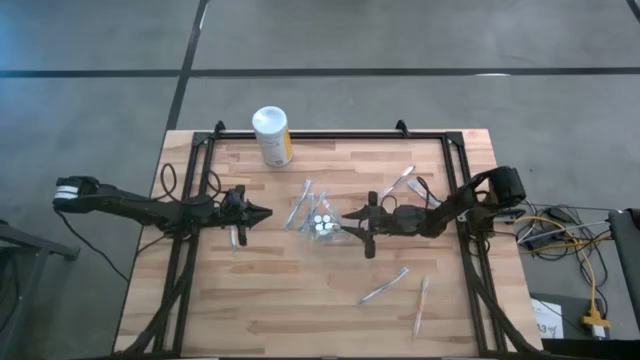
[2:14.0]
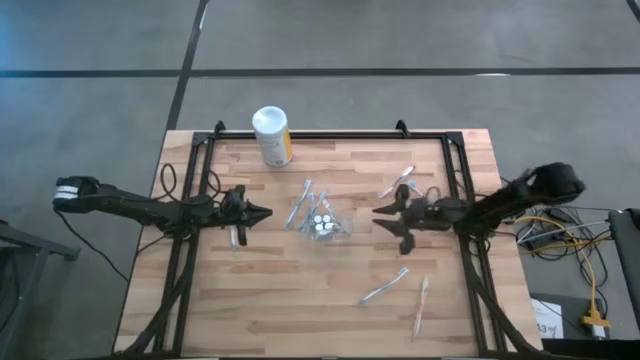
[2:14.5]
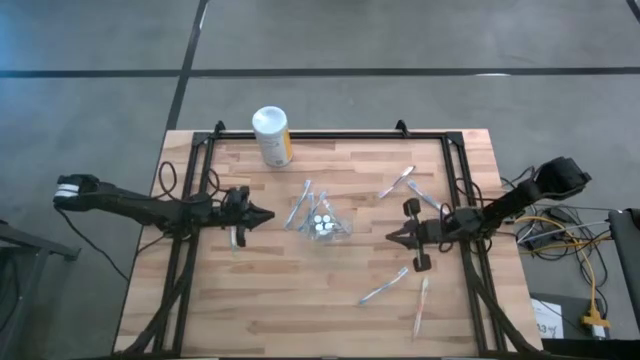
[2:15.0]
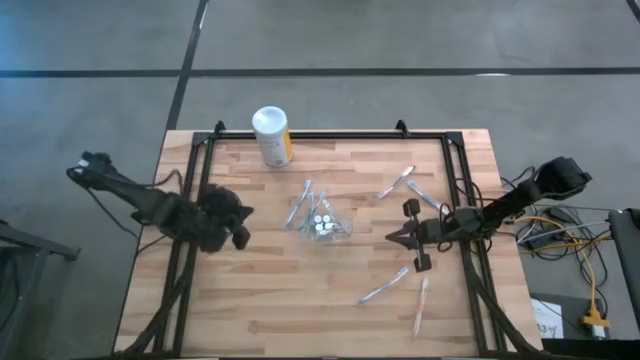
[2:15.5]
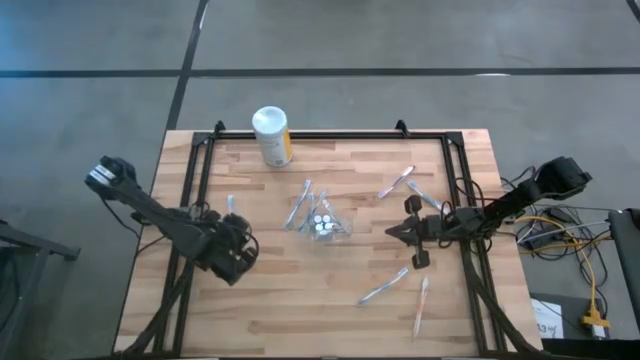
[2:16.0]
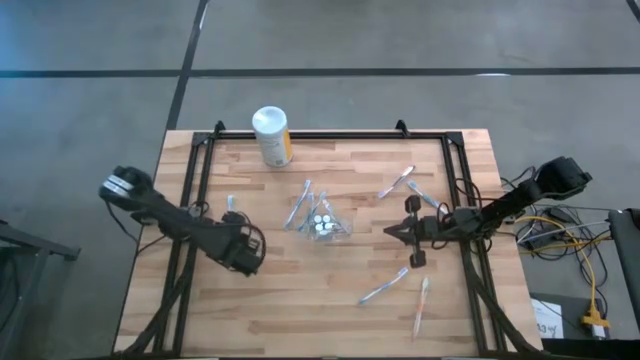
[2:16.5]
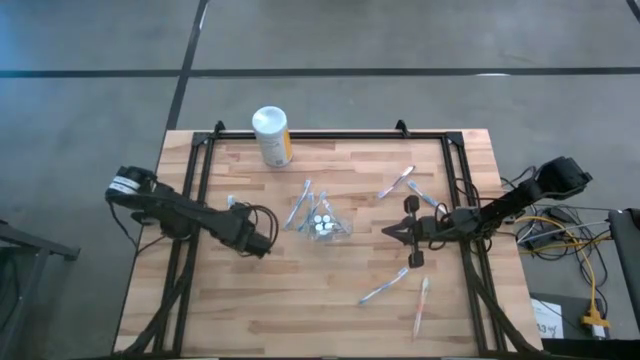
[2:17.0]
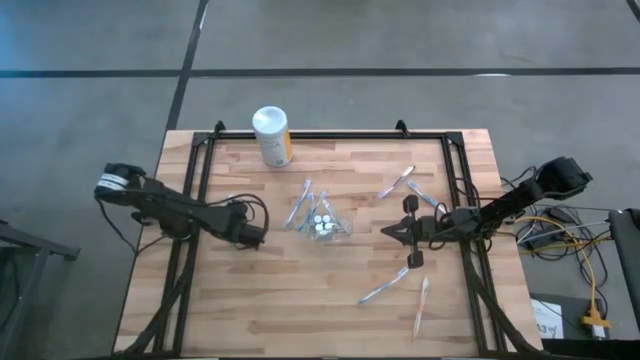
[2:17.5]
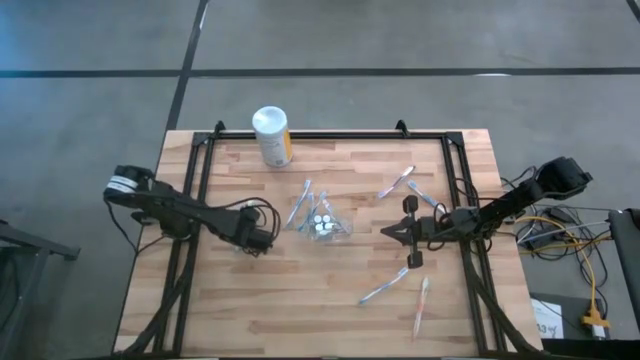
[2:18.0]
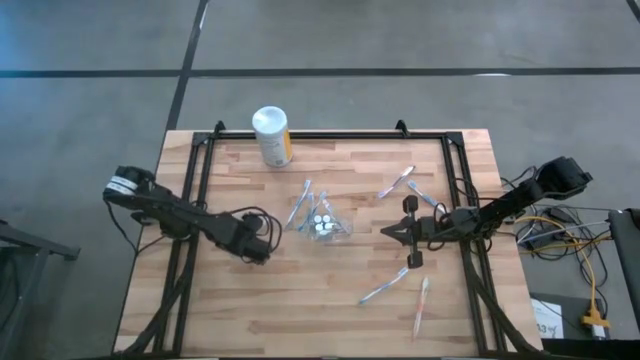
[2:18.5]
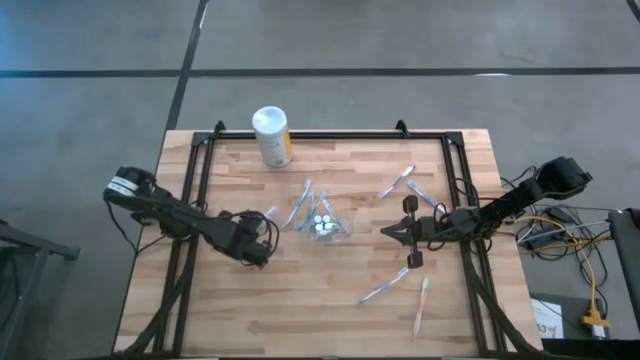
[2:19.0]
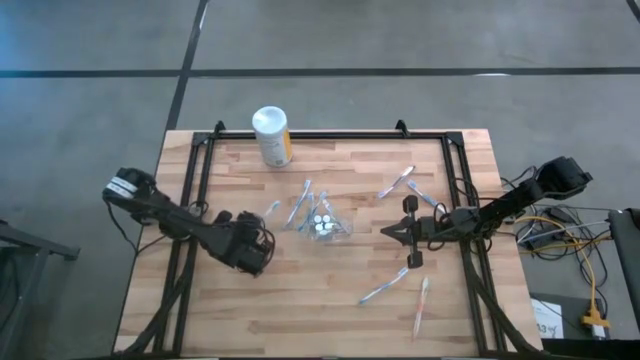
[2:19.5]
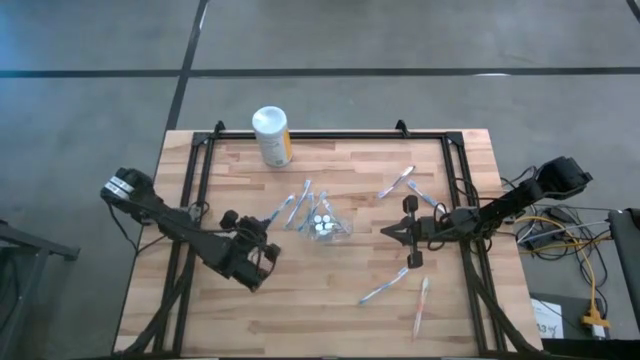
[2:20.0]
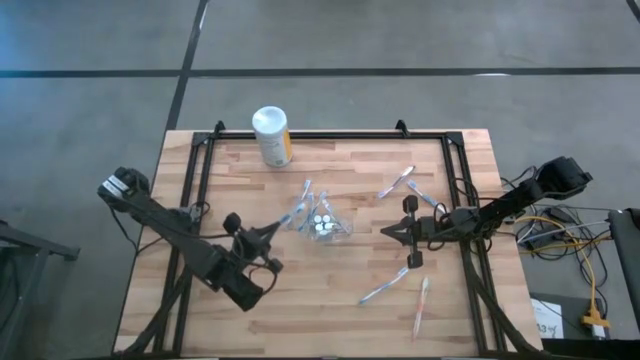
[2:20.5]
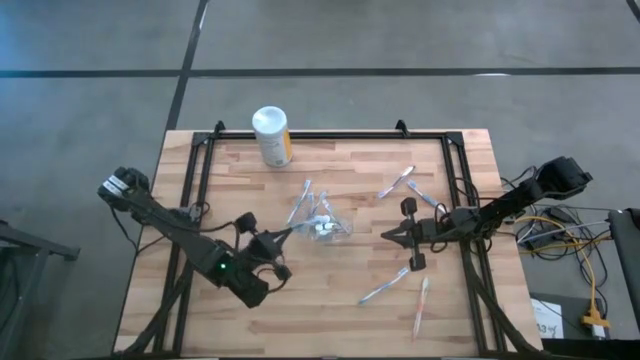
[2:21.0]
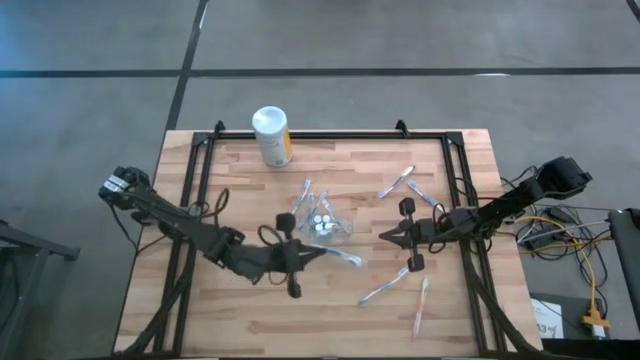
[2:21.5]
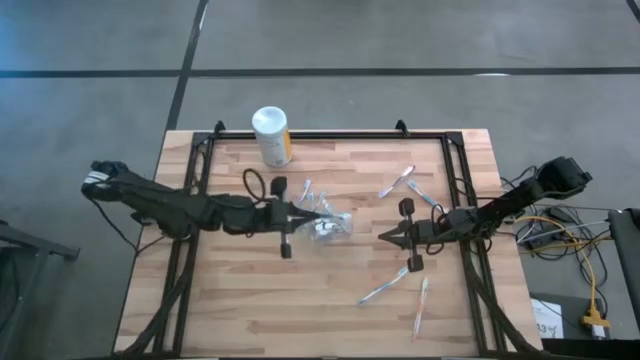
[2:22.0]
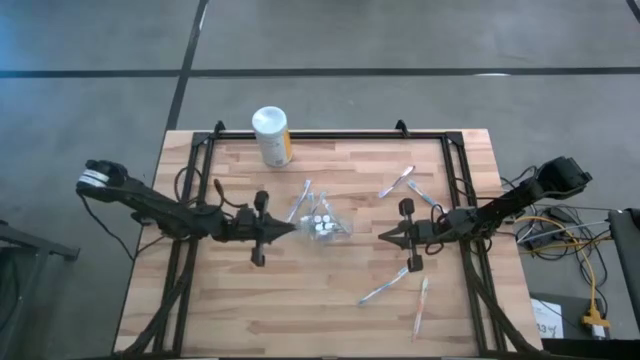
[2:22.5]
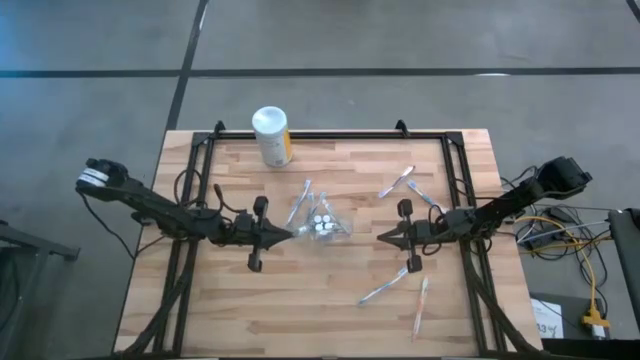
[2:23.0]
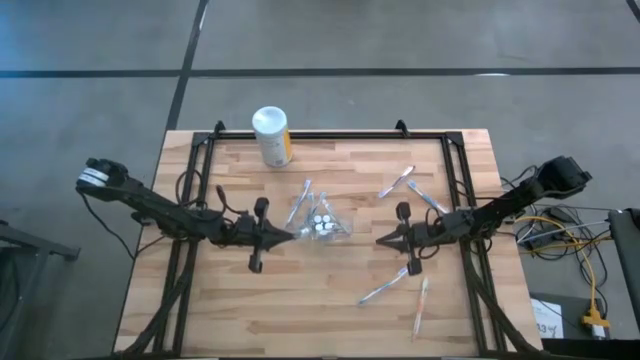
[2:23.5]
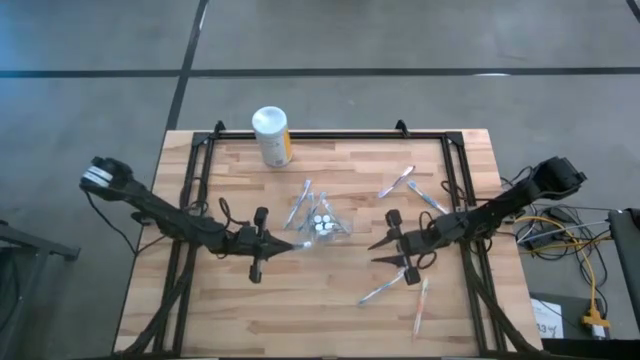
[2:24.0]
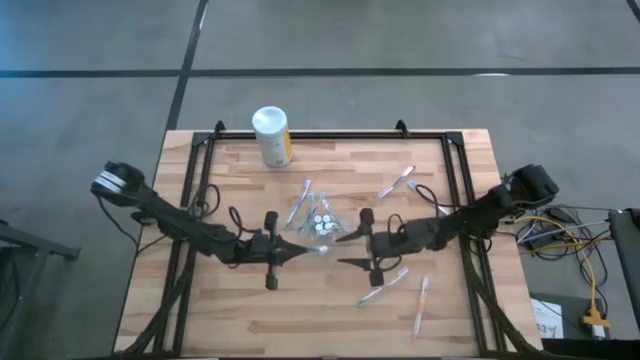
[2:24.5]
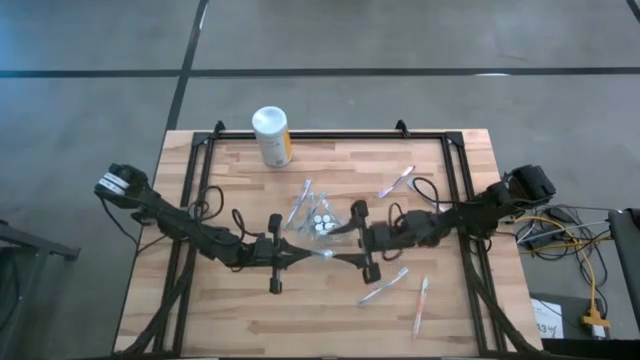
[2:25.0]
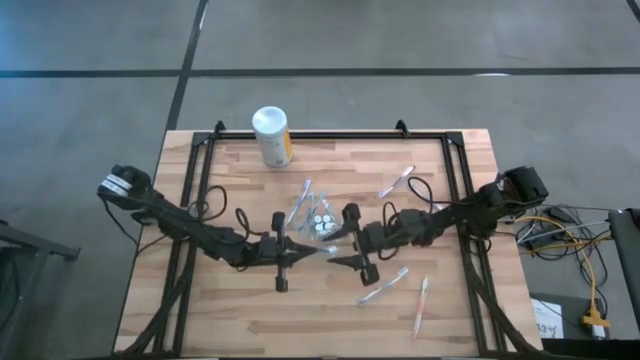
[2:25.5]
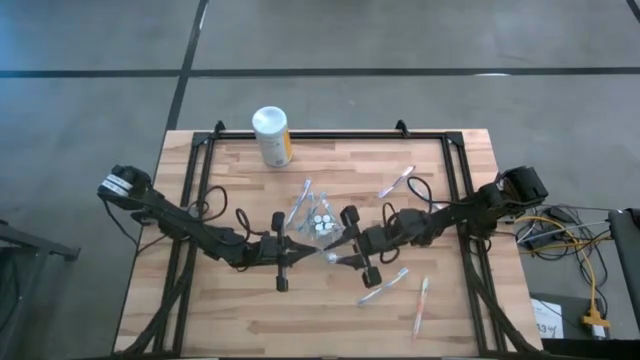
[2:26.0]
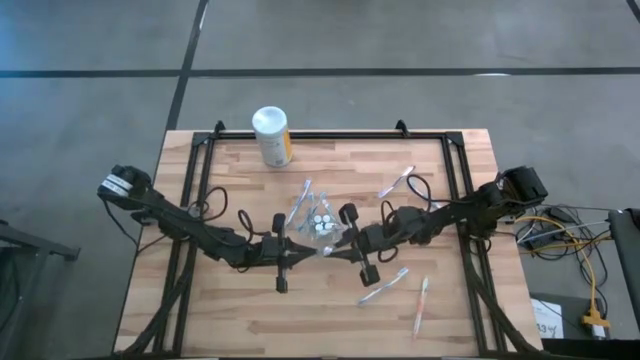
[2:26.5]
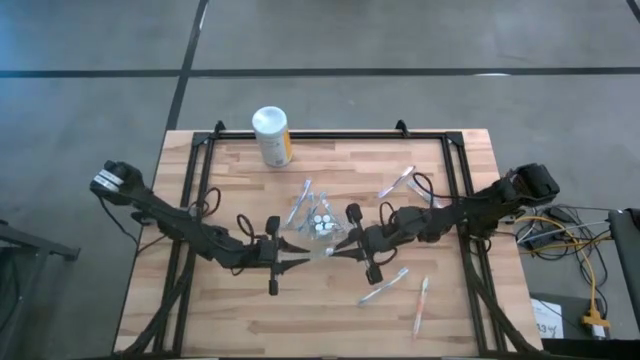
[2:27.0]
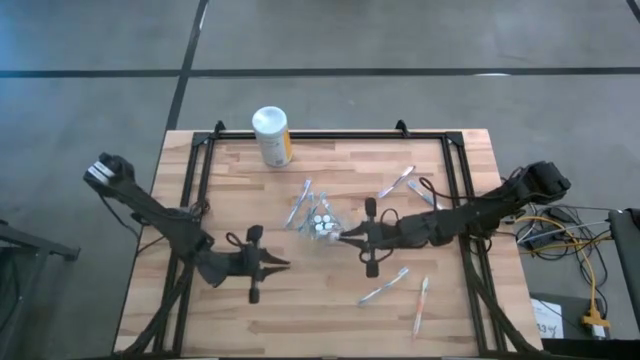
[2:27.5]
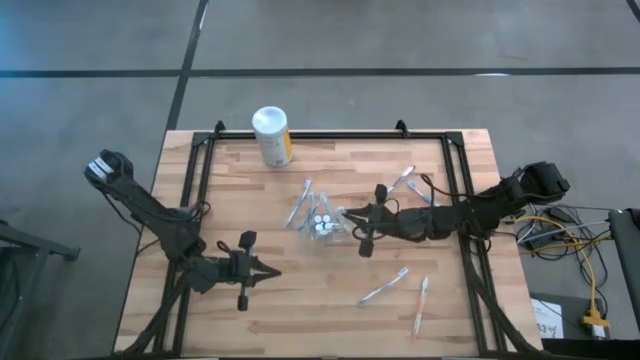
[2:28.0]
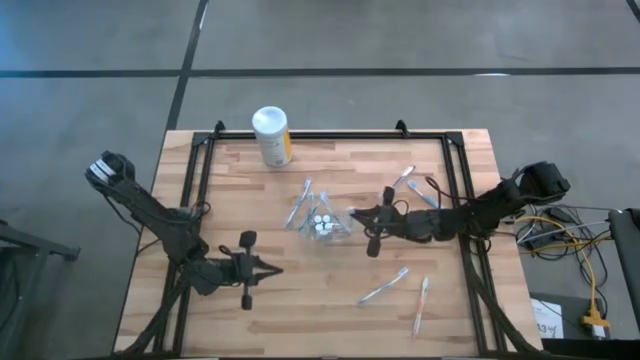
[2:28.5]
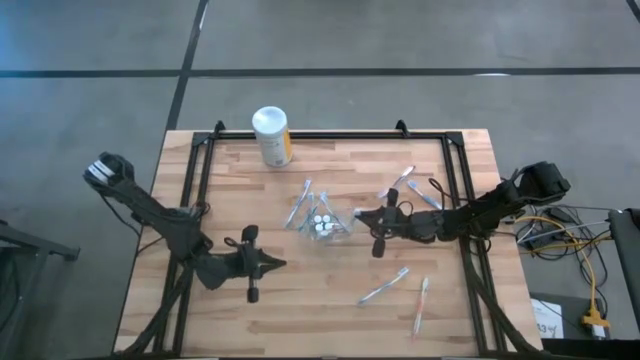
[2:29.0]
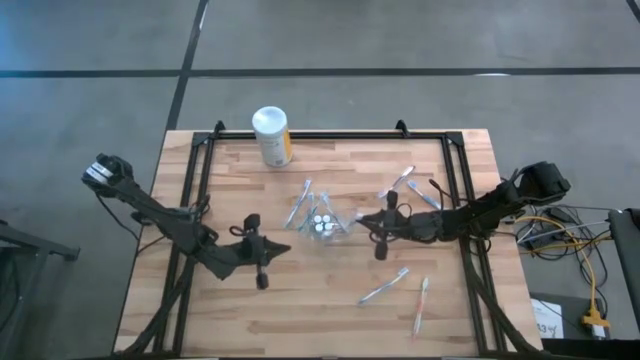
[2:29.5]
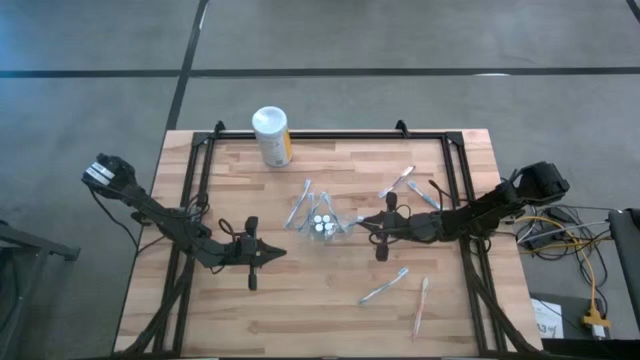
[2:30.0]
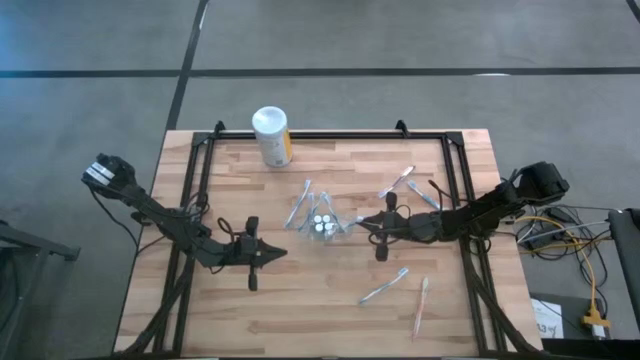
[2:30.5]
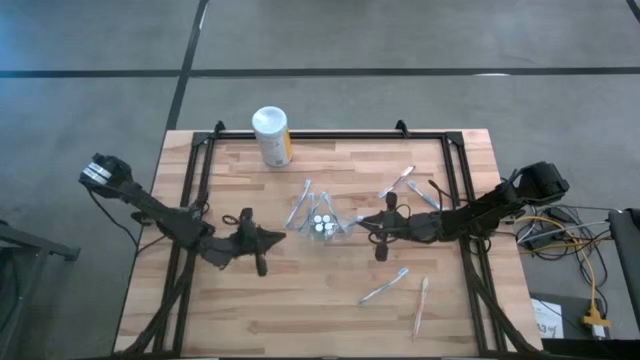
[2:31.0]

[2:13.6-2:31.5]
Task: Pick & Place toothbrushing station
Put the blue toothbrush into the transparent organizer

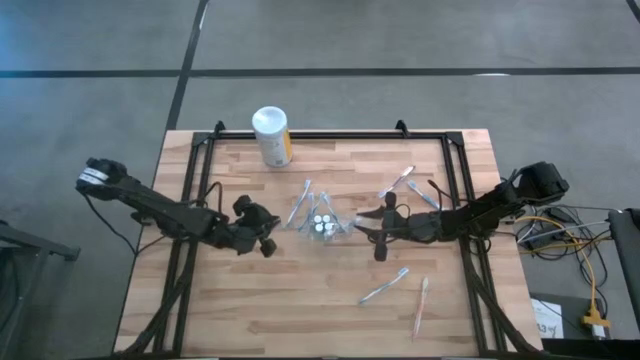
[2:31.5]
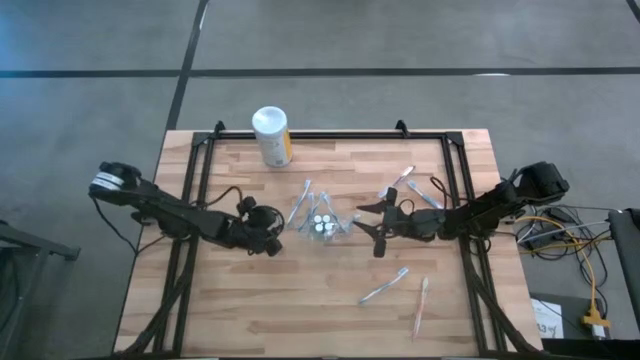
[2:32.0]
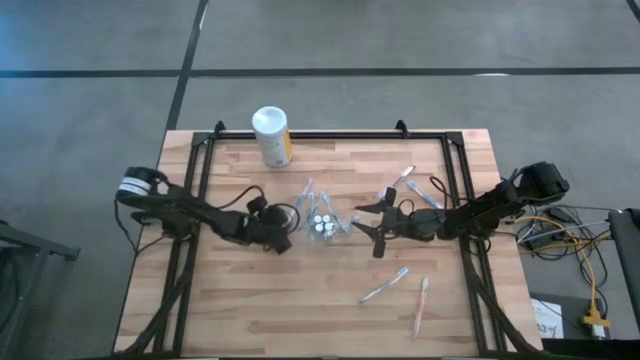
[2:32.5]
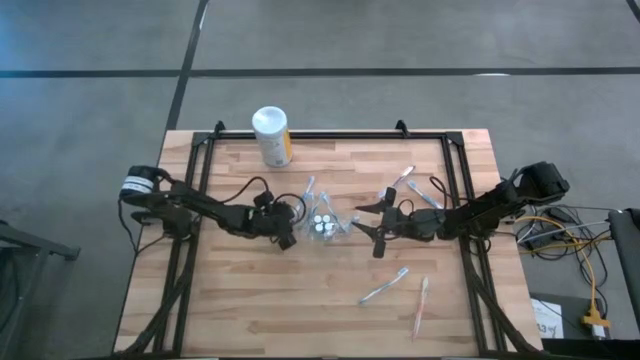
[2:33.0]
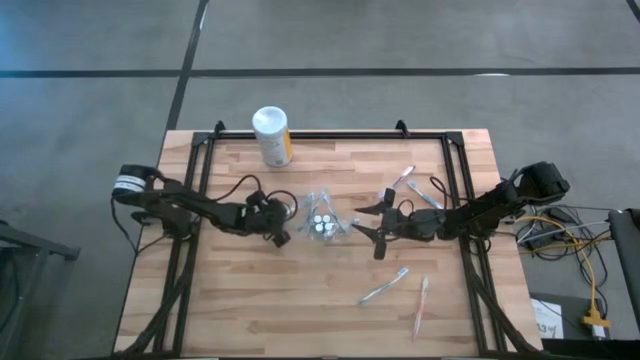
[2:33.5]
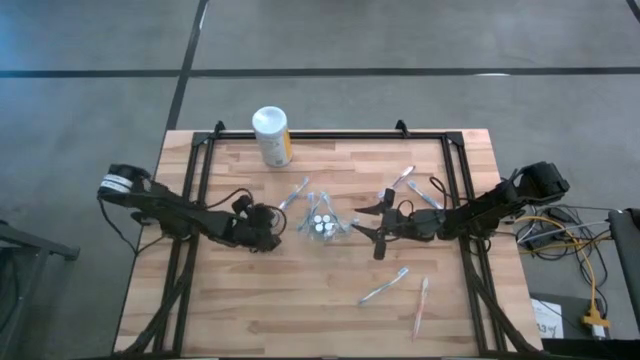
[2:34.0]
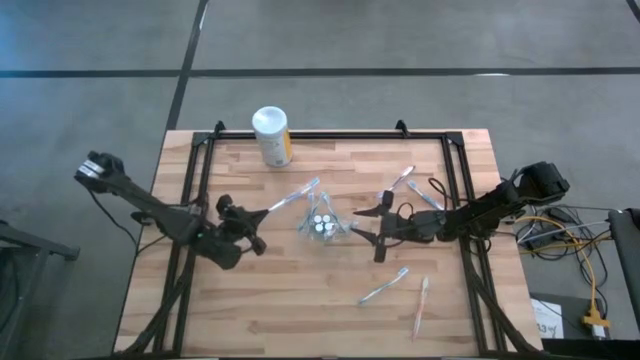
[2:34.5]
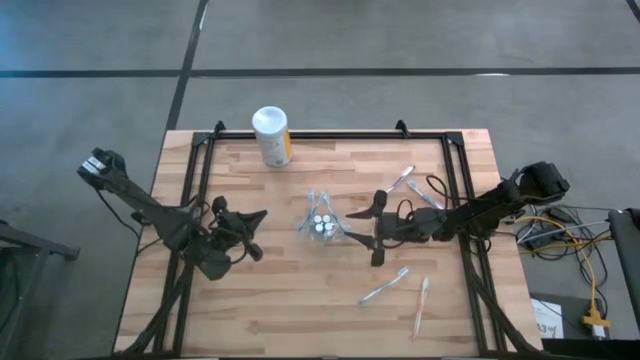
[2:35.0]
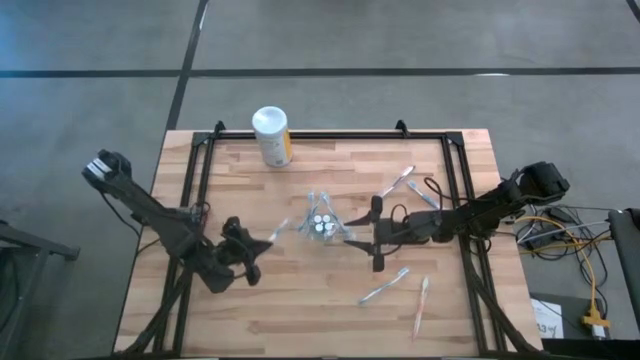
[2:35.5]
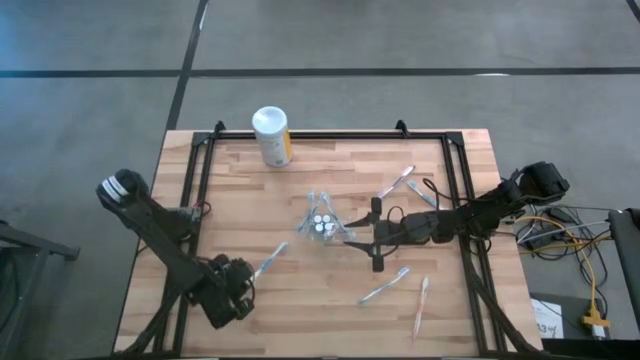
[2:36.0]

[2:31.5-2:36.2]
Put the blue toothbrush into the transparent organizer
